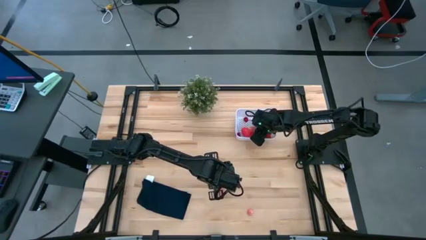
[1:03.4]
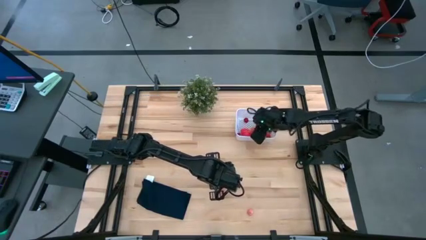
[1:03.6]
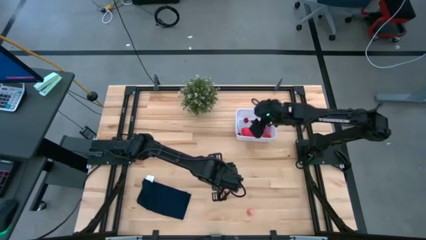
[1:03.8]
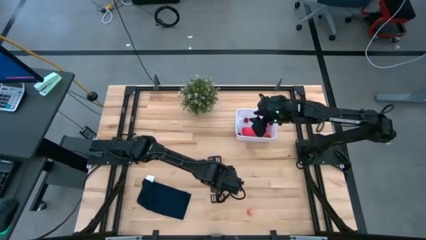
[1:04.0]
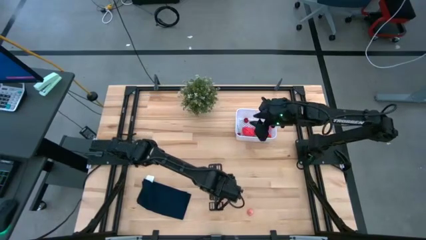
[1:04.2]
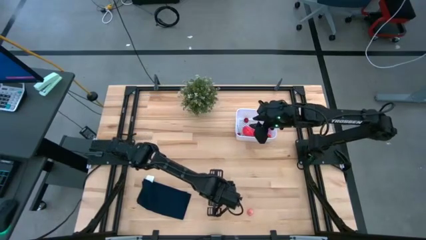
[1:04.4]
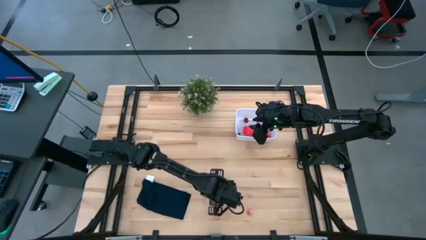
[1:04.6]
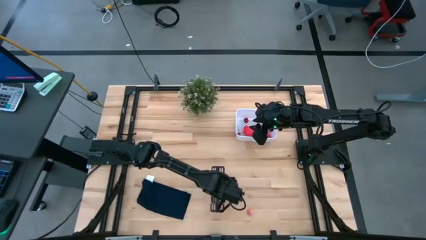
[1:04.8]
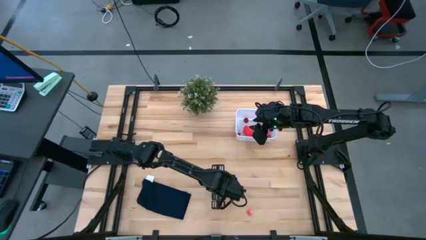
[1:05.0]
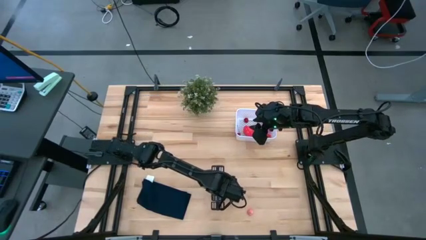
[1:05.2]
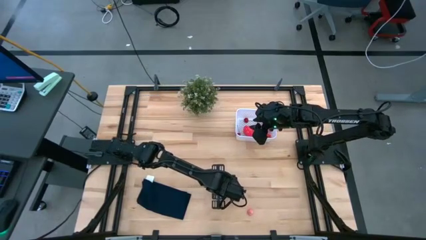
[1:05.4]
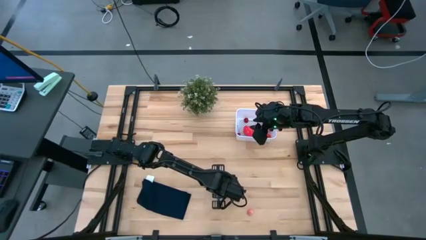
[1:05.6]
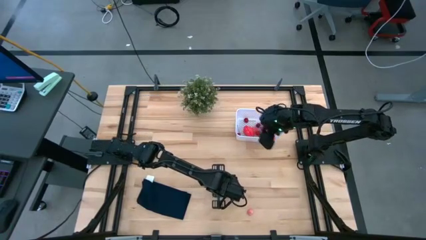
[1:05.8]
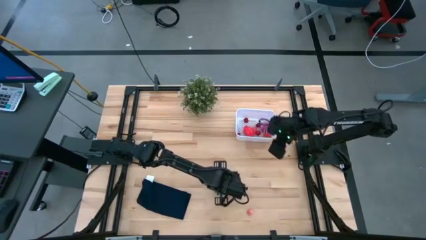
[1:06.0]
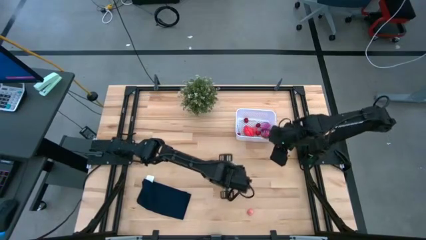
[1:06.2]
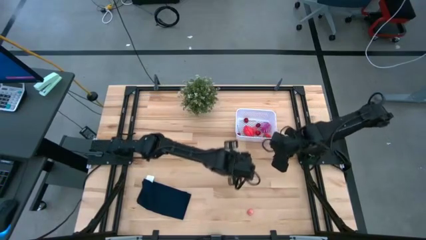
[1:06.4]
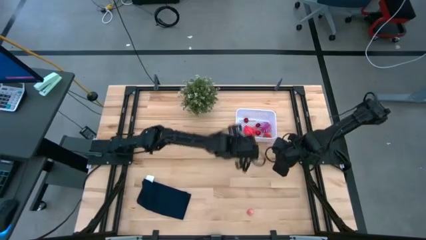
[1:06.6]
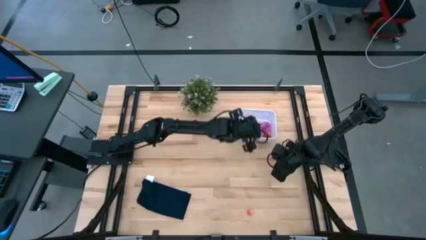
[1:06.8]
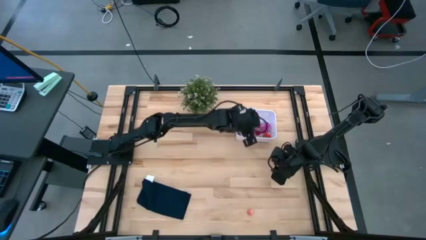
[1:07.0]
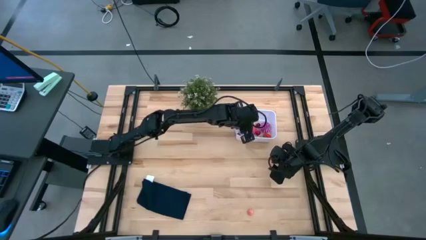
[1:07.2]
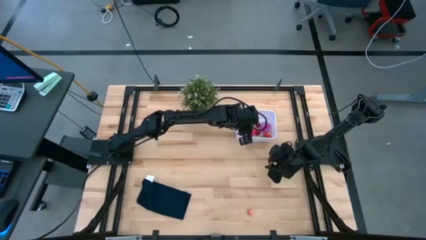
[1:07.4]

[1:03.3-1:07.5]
Task: Pick and placing Produce into tupperware
Put the top peach into the bin

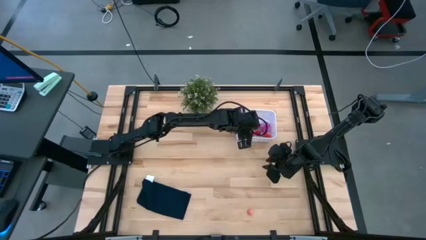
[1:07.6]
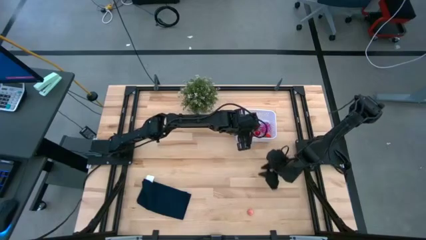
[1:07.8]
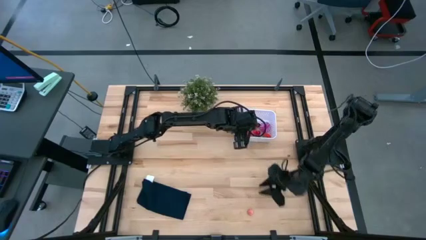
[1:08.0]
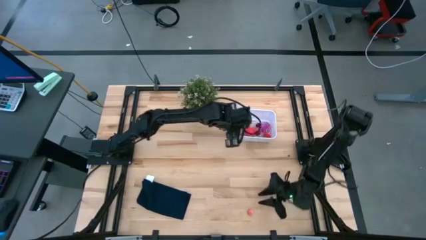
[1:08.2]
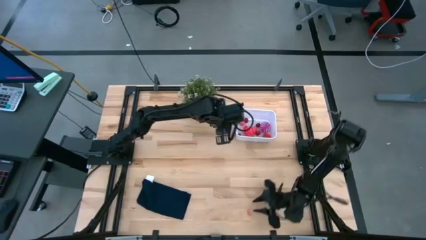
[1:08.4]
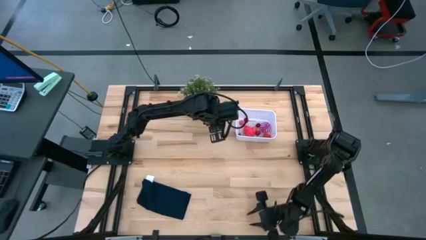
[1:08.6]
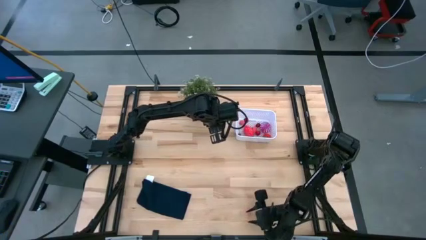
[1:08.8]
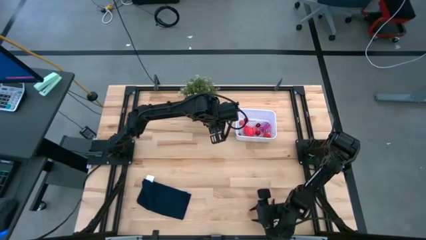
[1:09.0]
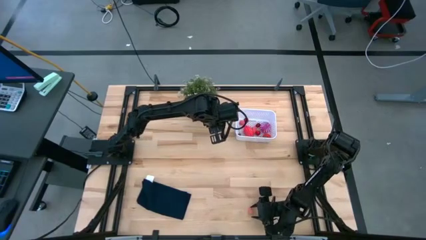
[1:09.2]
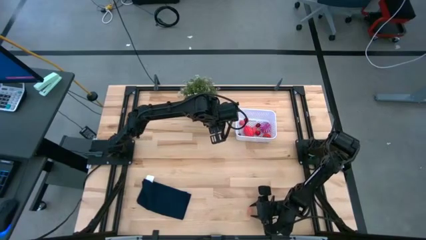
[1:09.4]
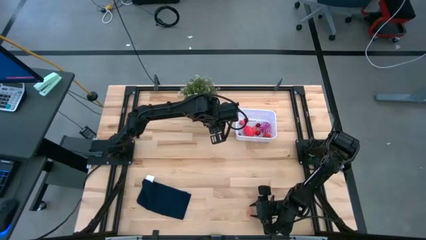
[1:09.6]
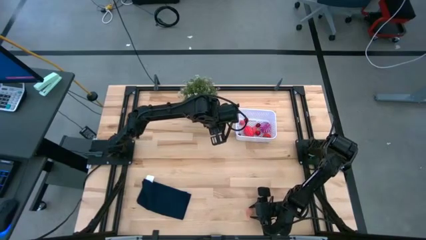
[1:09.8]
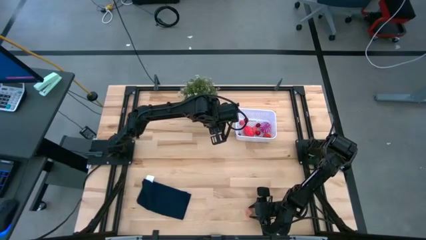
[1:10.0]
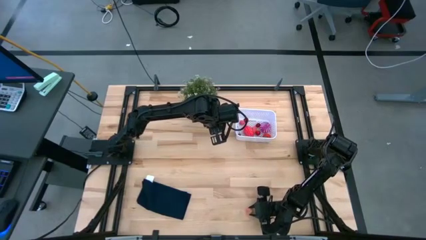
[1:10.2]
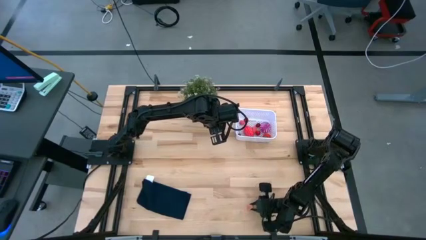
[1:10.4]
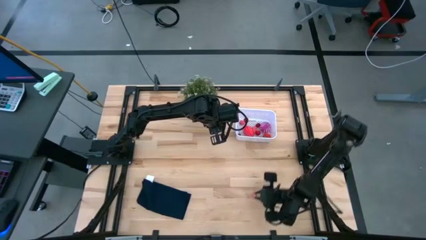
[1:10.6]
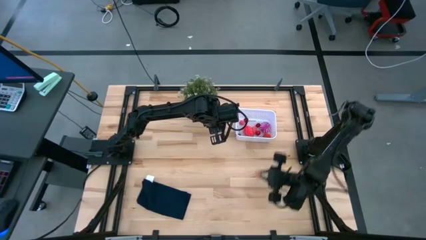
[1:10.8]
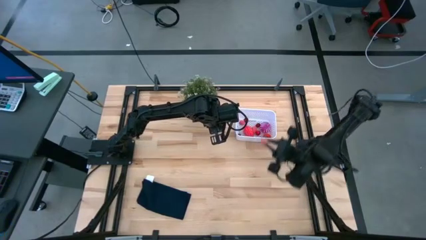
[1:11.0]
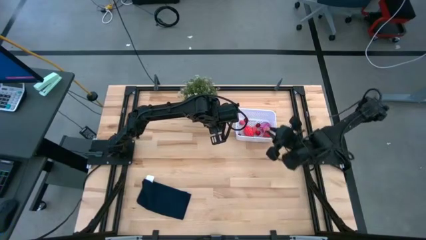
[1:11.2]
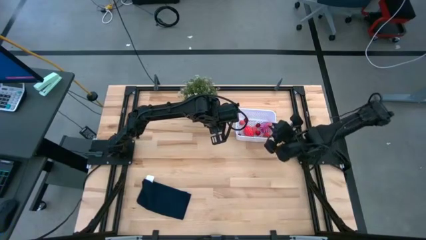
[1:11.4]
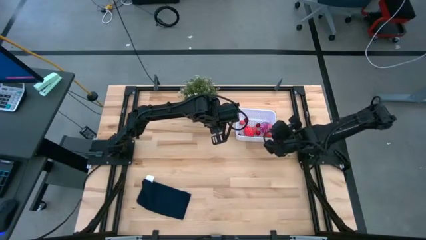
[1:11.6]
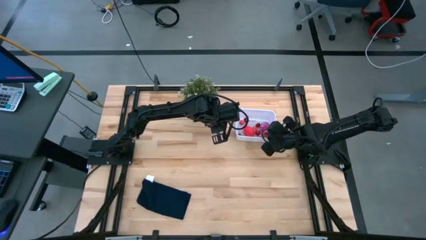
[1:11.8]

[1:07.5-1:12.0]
Put the peach into the bin

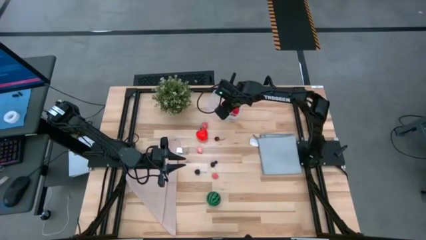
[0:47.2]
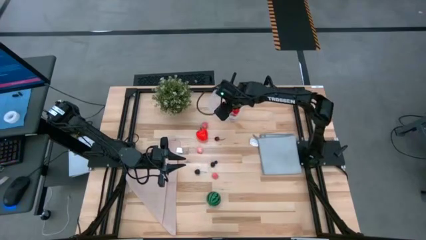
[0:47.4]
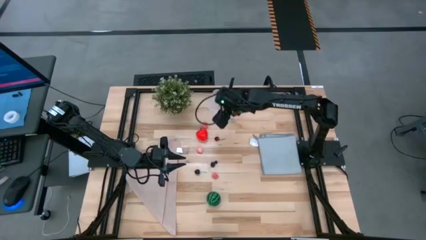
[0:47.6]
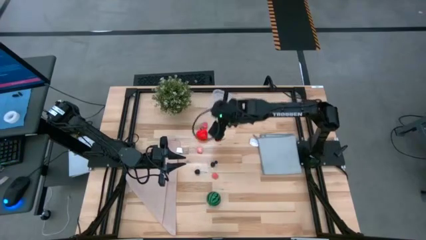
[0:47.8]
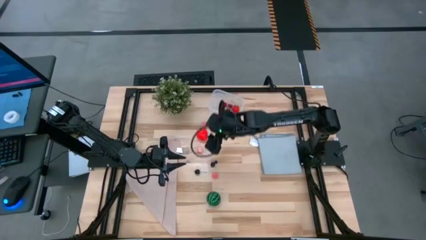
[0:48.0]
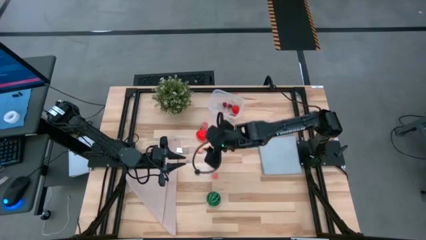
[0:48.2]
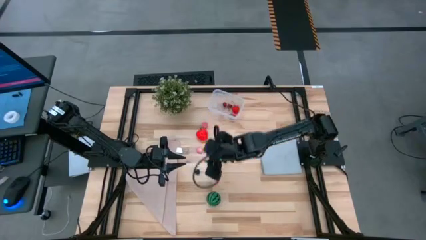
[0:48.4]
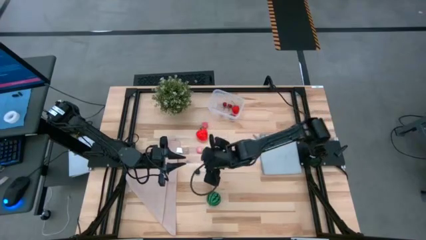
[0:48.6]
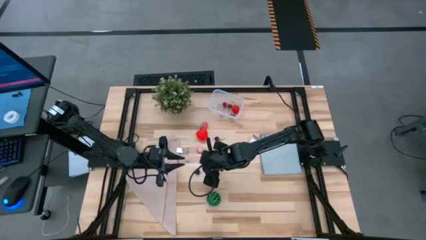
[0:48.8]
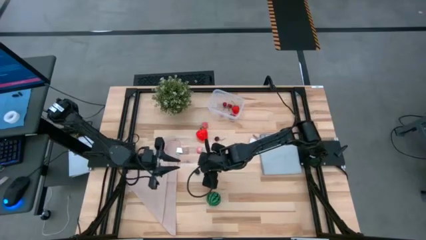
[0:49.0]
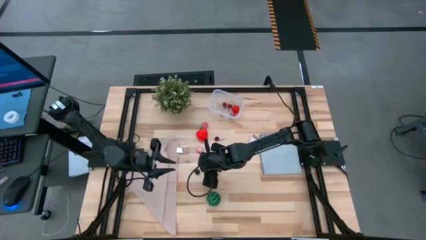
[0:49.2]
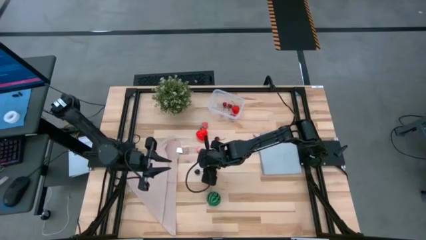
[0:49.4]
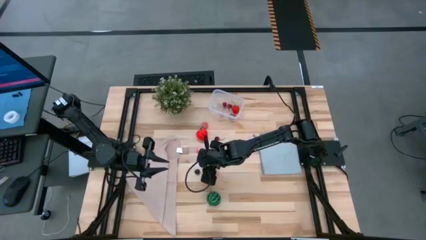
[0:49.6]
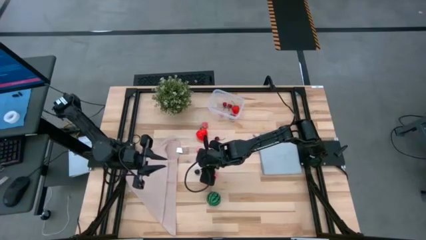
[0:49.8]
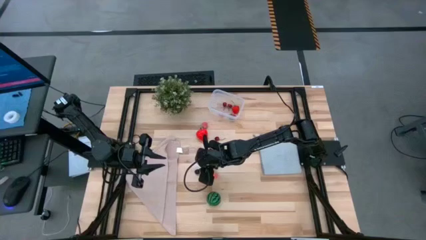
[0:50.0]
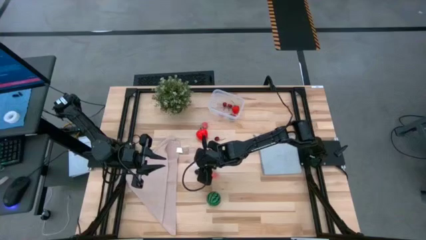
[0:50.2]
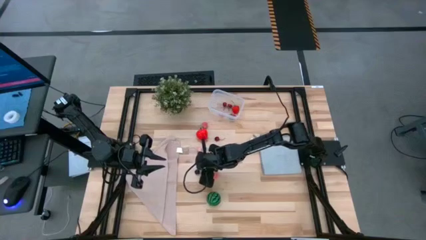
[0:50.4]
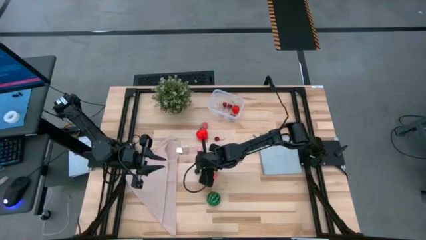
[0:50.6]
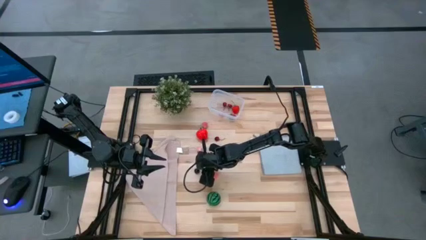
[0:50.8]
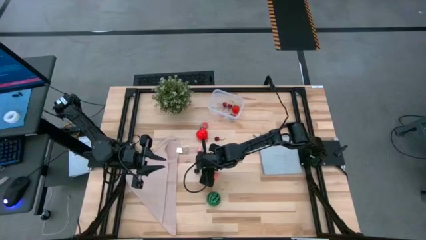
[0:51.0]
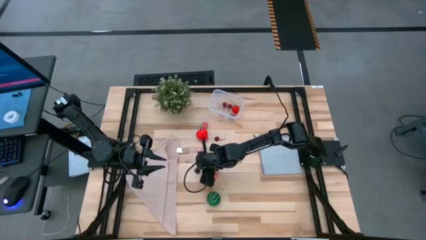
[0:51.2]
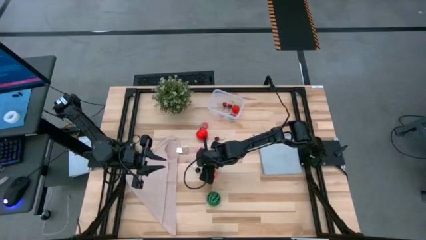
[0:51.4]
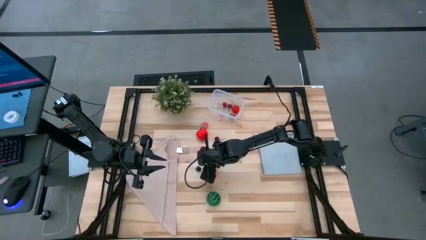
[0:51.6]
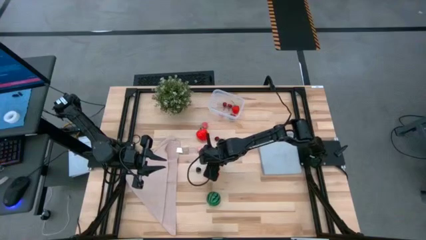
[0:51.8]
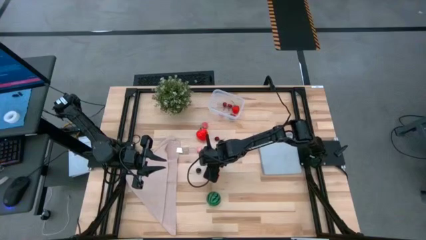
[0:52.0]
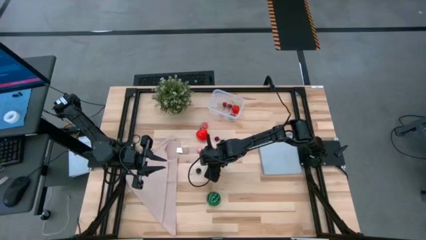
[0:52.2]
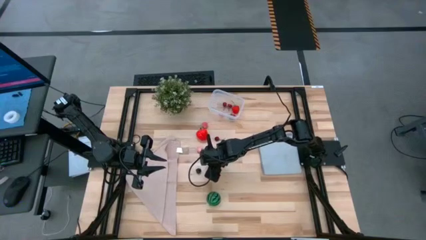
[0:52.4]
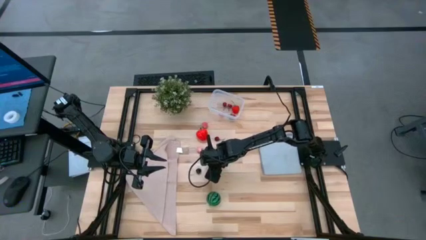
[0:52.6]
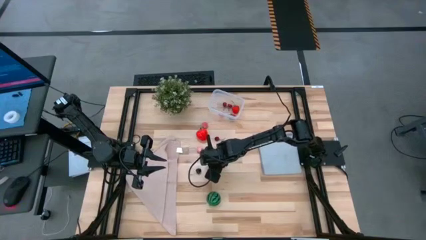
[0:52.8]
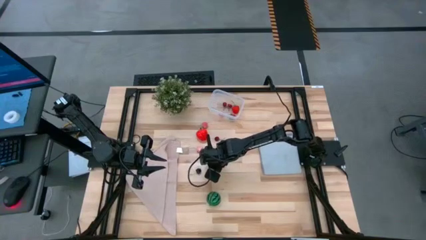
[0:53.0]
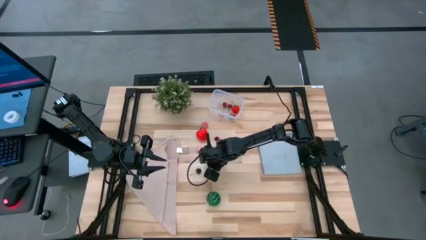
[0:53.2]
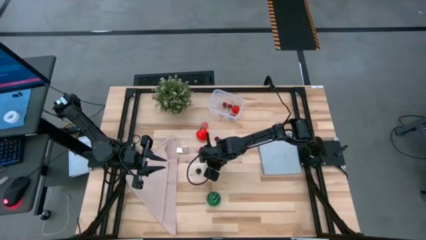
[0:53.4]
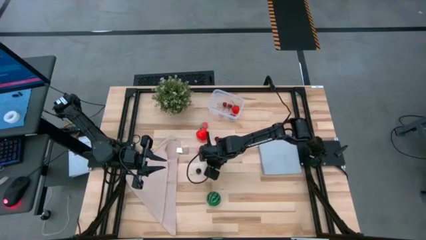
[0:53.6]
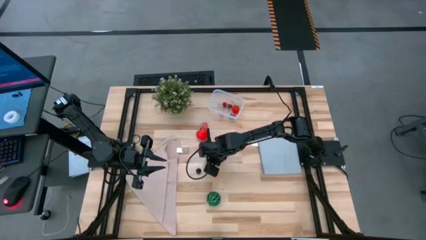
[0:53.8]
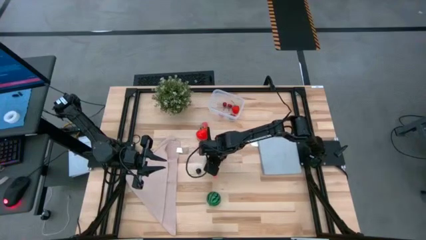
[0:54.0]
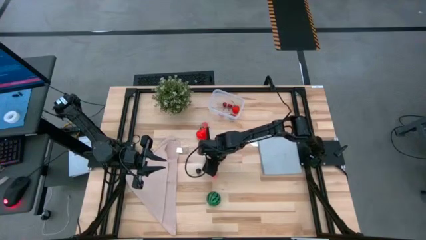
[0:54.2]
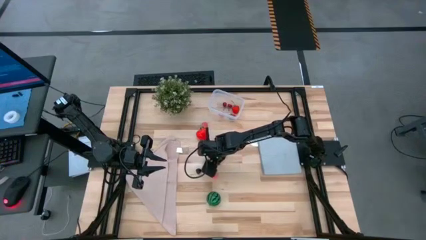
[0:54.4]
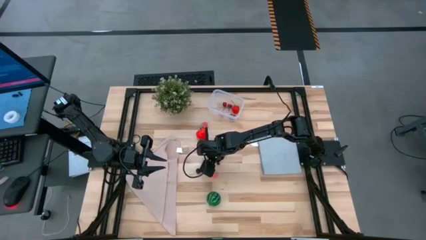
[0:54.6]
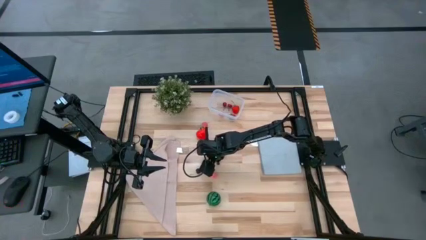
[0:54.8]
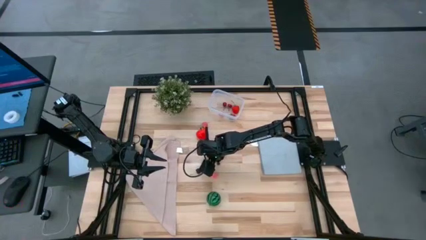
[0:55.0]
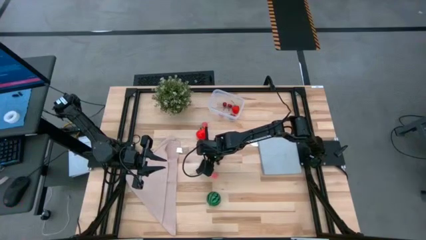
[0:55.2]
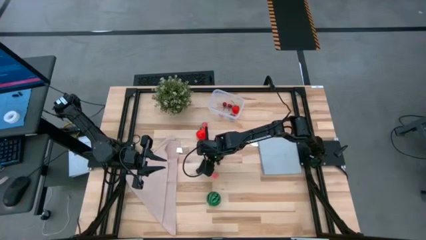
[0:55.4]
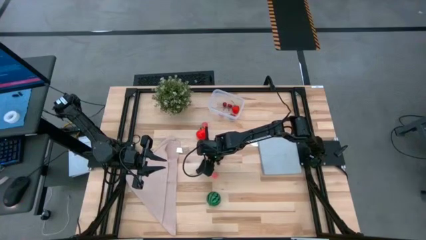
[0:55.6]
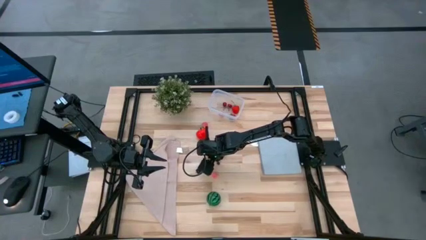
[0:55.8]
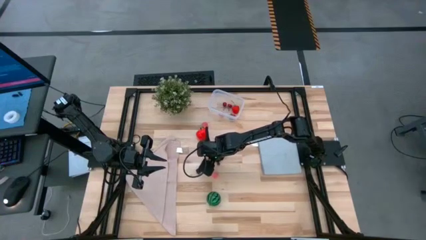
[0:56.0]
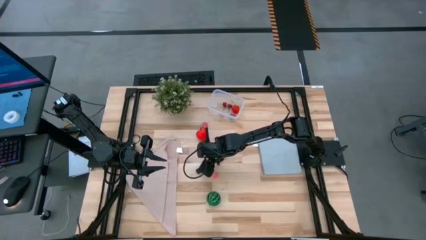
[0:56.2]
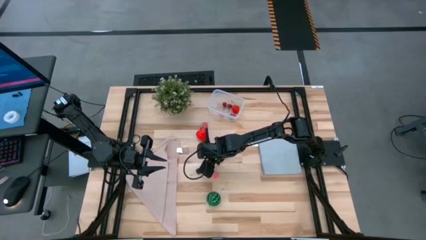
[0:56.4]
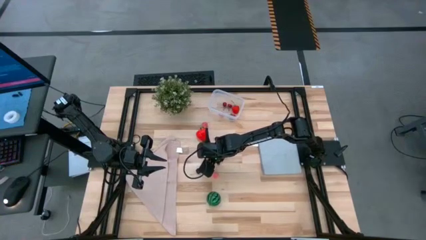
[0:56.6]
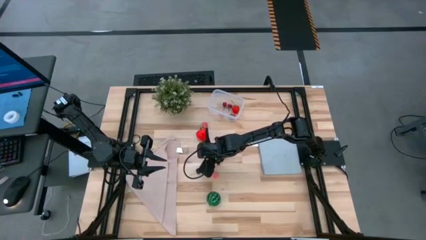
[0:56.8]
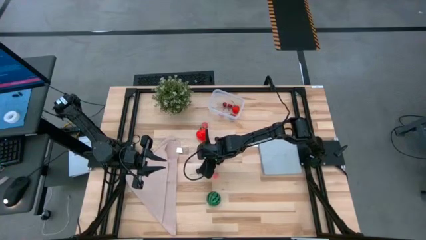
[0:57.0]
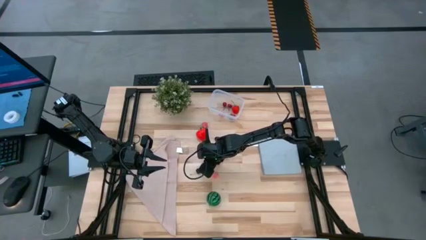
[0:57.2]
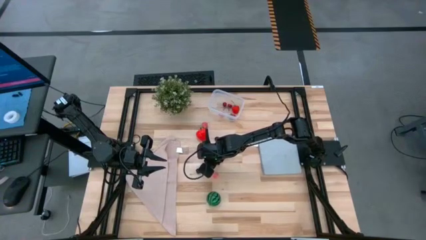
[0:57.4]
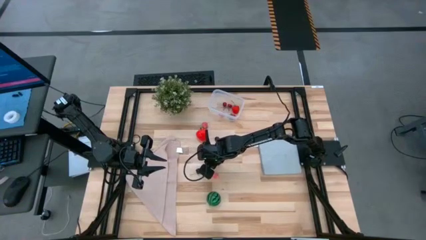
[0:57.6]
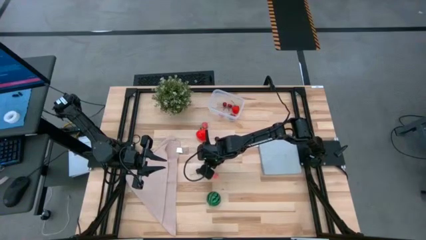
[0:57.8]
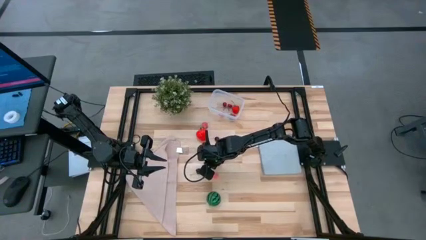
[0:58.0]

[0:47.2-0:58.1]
Task: Pick and placing Produce into tupperware
Put the blackberry into the transparent bin
